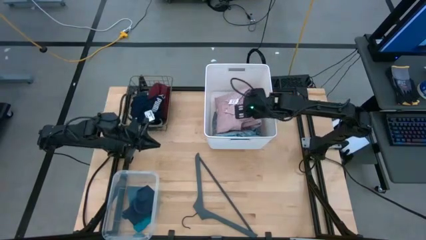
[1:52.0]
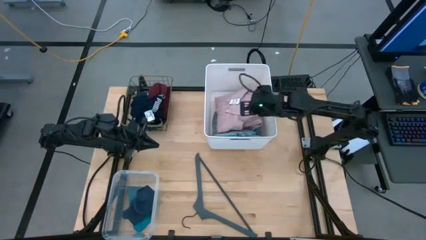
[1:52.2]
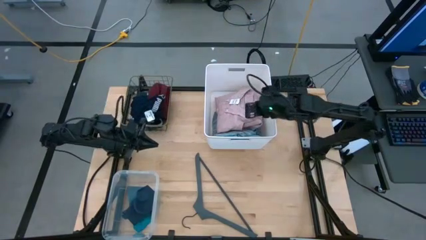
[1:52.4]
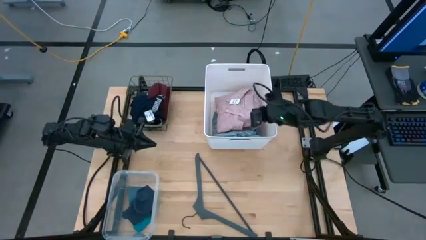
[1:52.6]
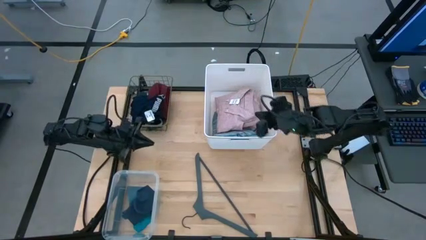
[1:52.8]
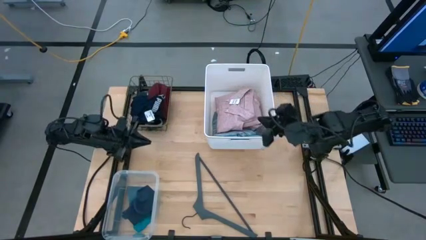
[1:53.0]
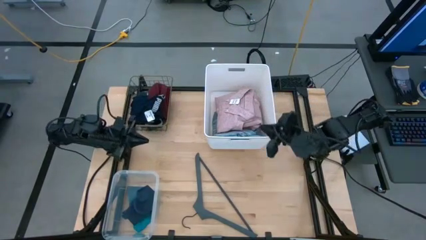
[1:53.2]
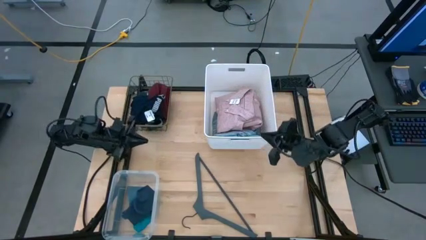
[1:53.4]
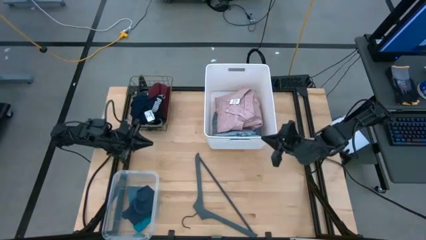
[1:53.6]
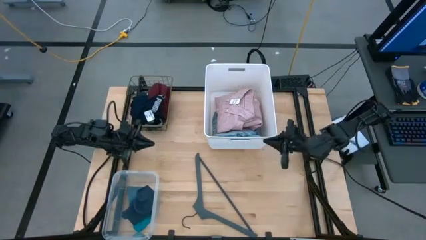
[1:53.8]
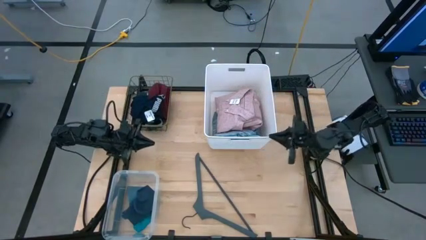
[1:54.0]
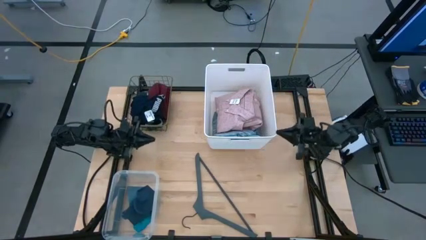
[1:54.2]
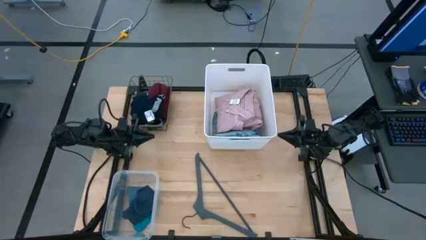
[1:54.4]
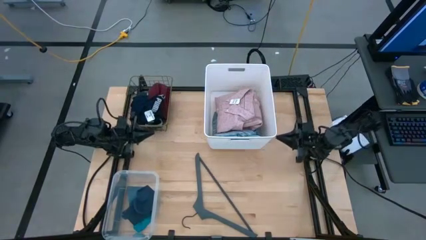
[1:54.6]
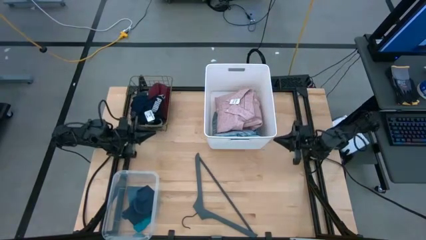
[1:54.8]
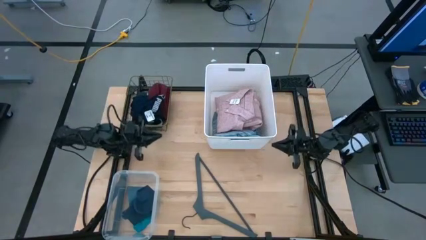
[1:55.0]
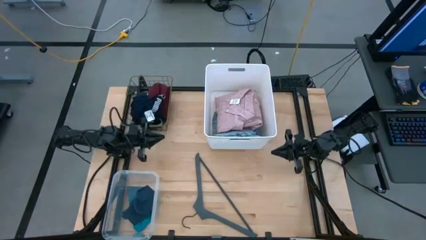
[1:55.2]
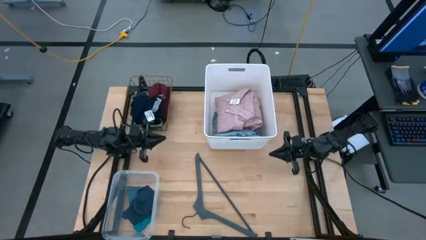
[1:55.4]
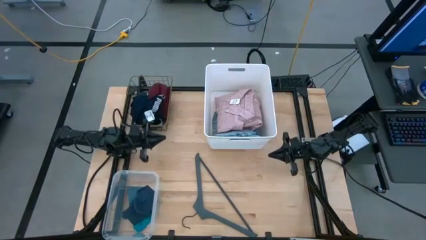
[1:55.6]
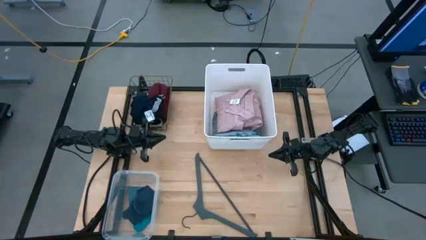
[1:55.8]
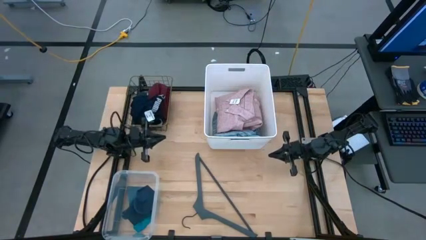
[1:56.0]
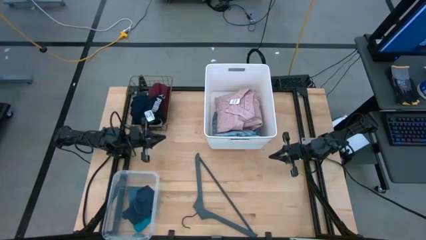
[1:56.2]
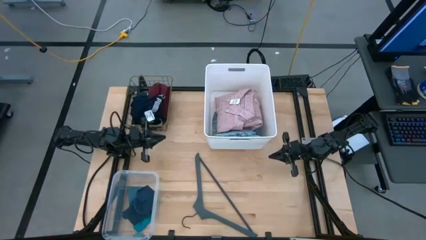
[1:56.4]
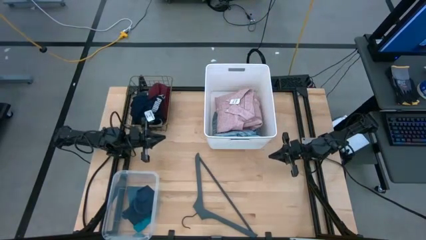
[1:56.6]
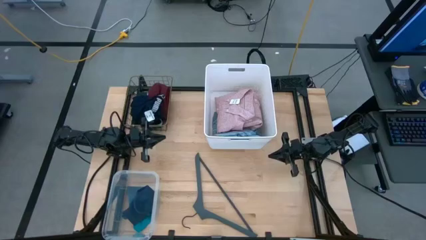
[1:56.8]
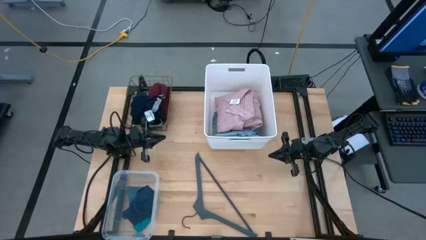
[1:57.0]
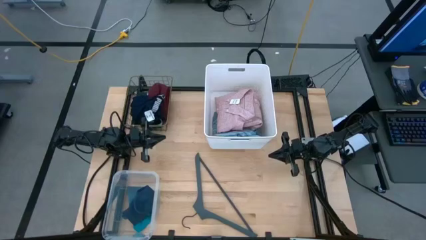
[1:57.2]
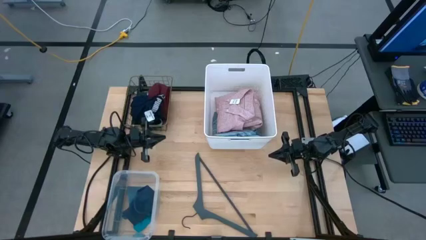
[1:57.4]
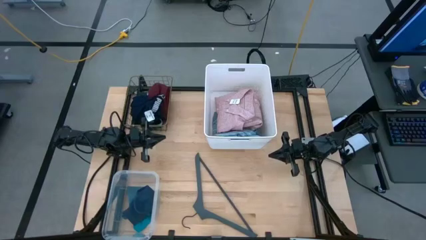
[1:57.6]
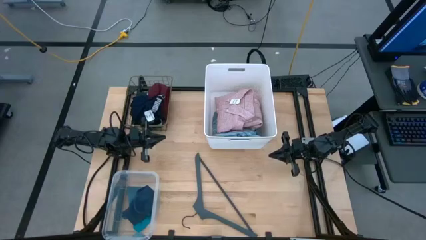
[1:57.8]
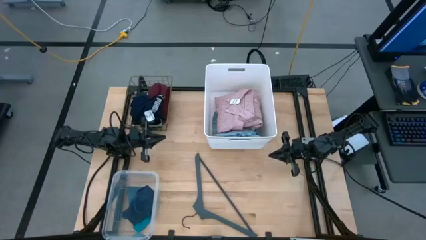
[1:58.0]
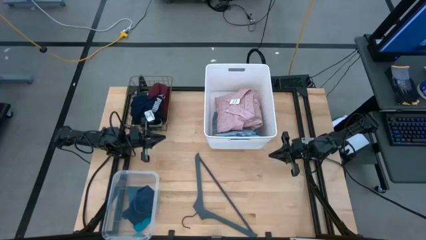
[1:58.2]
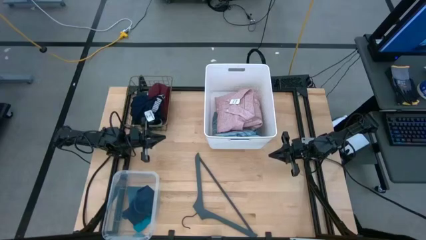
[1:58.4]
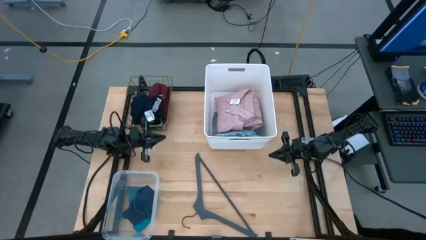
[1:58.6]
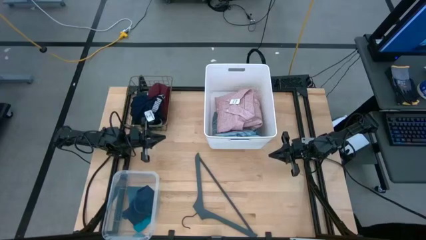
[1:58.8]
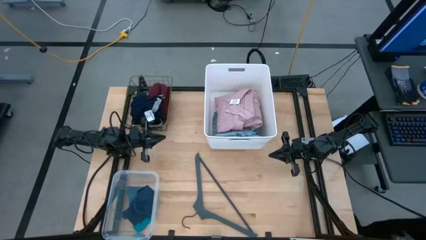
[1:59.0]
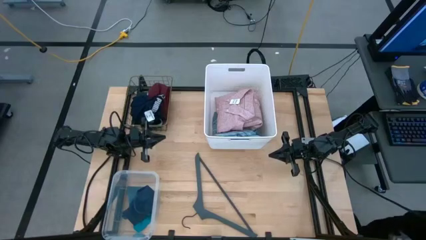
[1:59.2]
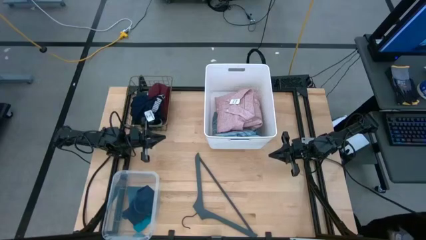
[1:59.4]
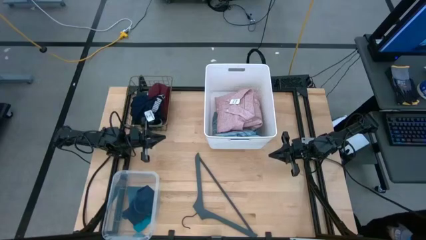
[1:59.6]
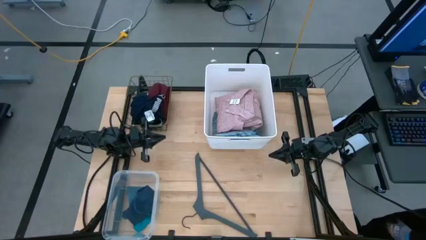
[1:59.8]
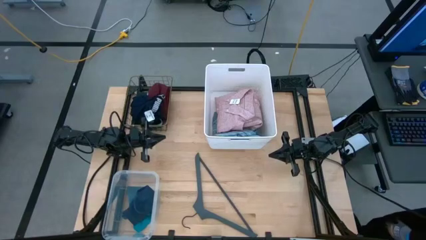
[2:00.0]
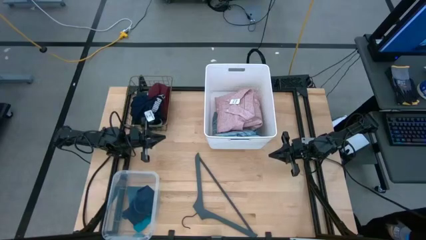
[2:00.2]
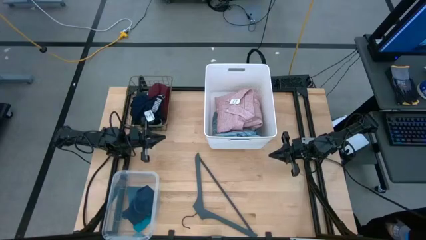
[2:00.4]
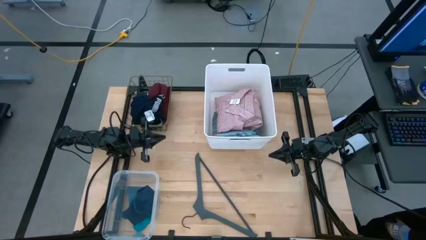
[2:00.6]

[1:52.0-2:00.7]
Task: Pick & Place Cloths
Return to Home Position

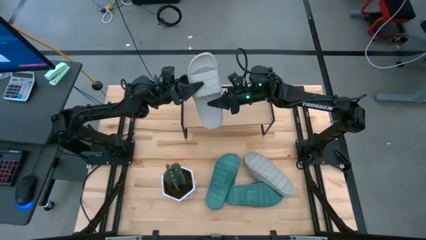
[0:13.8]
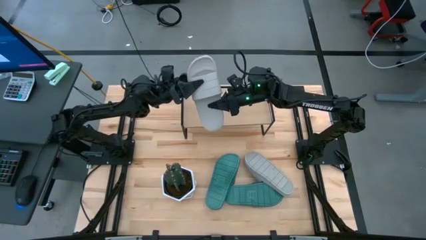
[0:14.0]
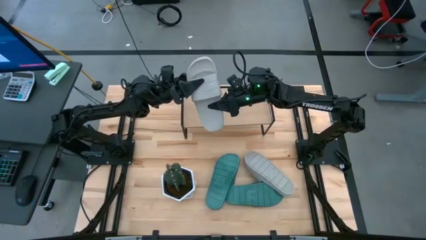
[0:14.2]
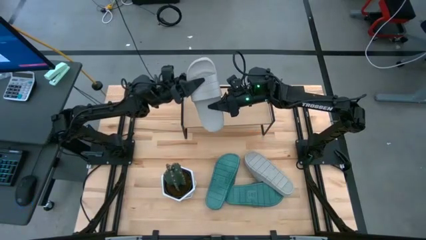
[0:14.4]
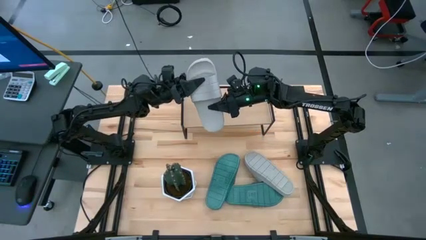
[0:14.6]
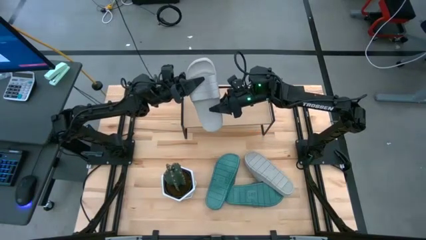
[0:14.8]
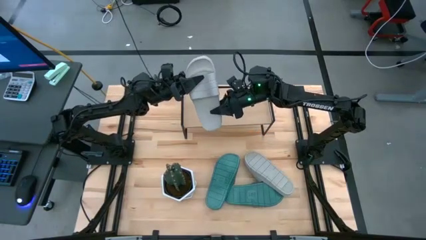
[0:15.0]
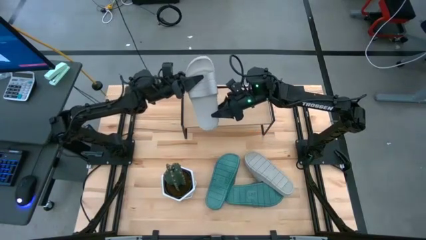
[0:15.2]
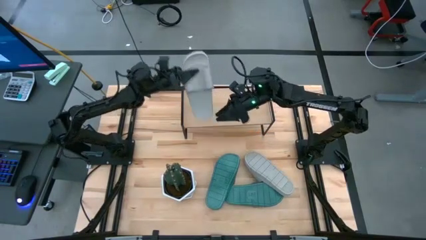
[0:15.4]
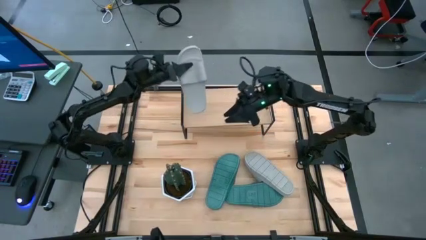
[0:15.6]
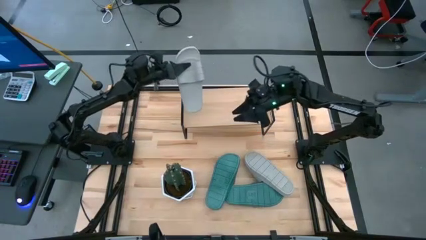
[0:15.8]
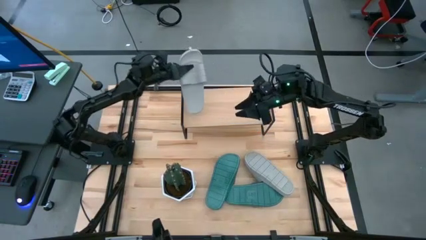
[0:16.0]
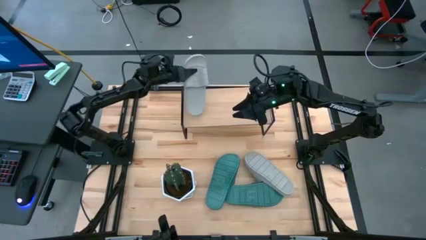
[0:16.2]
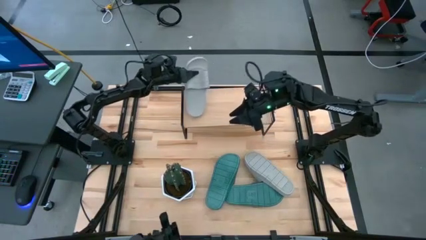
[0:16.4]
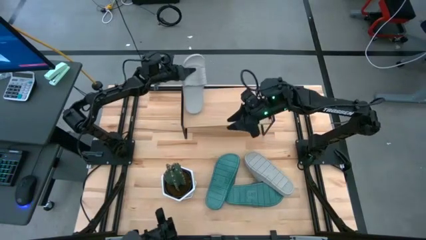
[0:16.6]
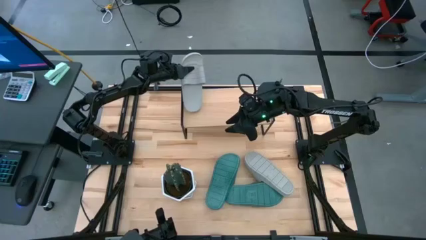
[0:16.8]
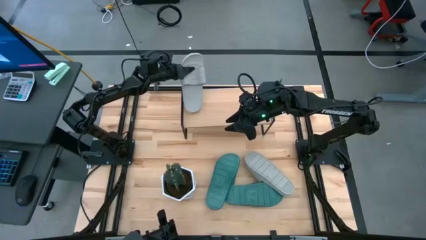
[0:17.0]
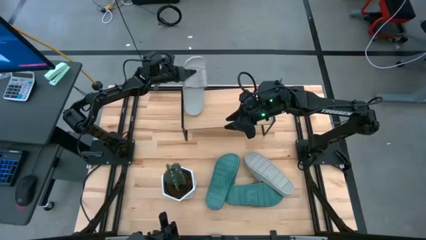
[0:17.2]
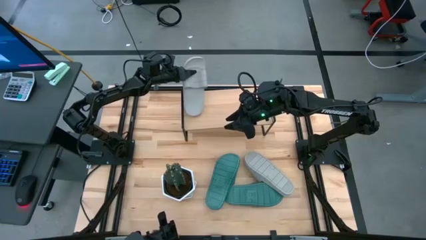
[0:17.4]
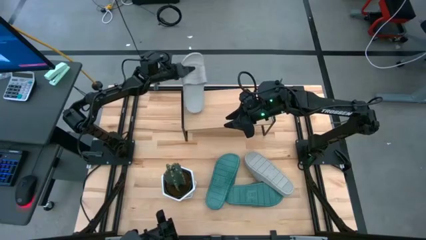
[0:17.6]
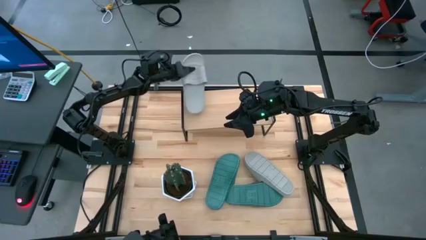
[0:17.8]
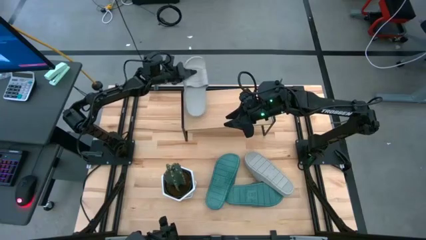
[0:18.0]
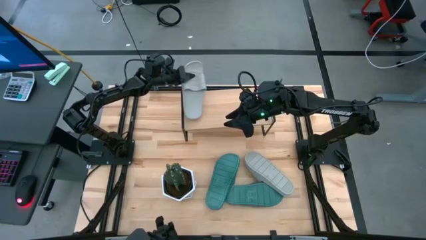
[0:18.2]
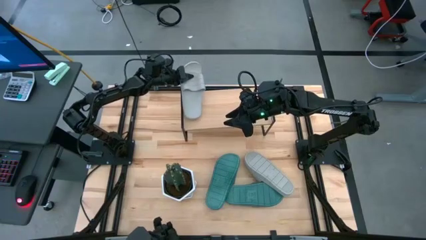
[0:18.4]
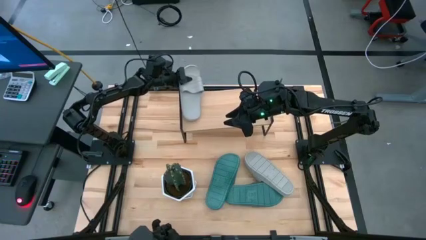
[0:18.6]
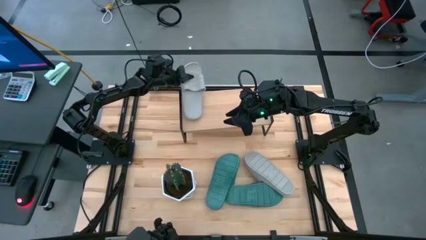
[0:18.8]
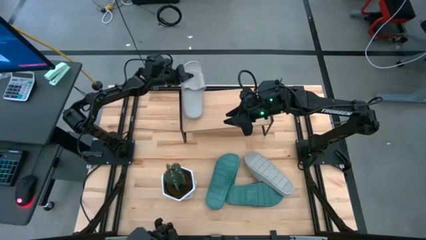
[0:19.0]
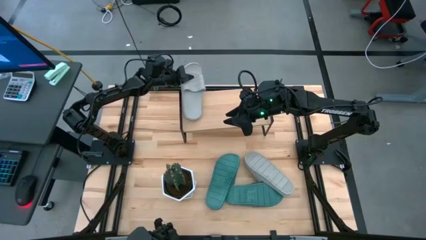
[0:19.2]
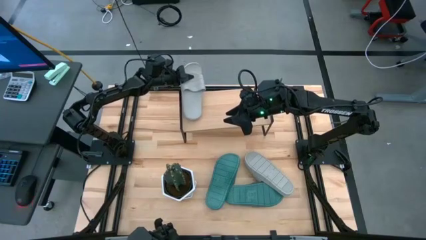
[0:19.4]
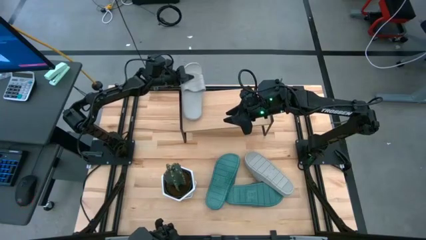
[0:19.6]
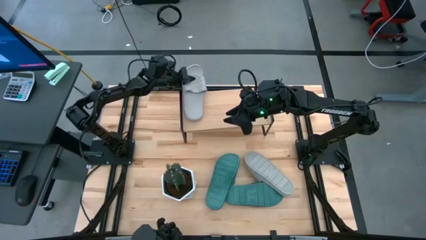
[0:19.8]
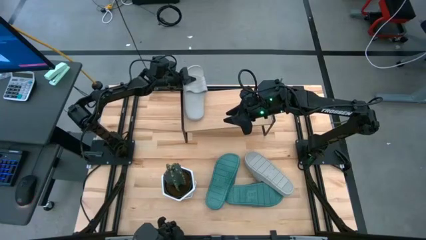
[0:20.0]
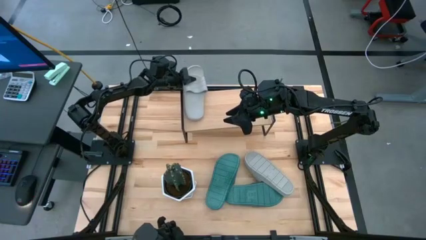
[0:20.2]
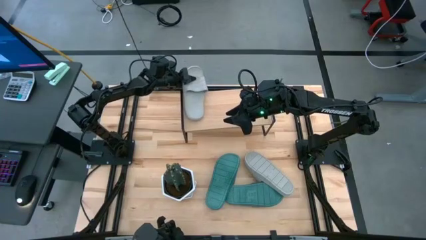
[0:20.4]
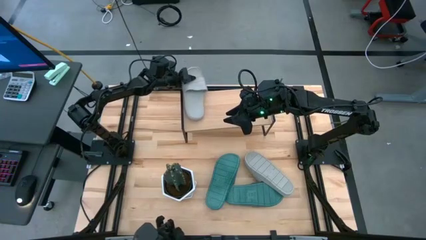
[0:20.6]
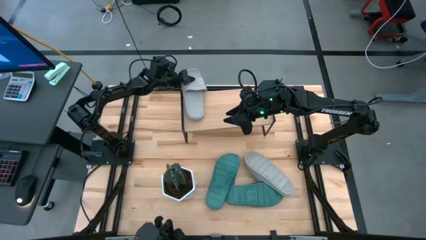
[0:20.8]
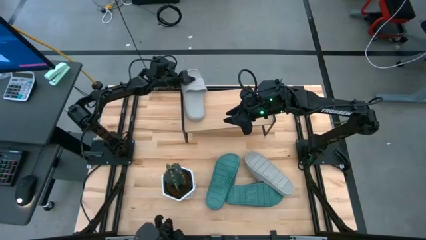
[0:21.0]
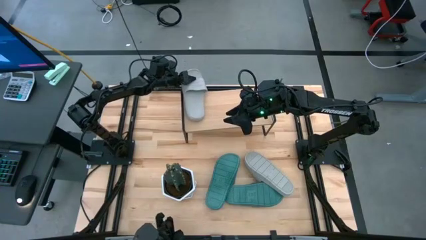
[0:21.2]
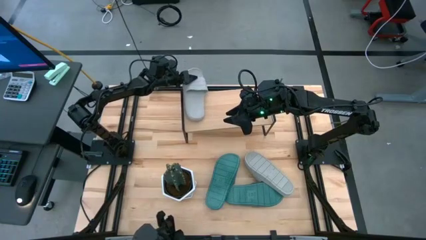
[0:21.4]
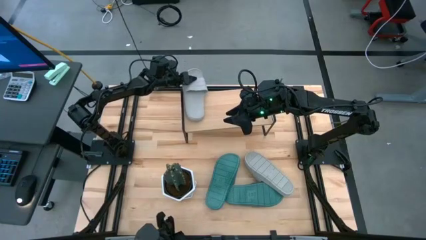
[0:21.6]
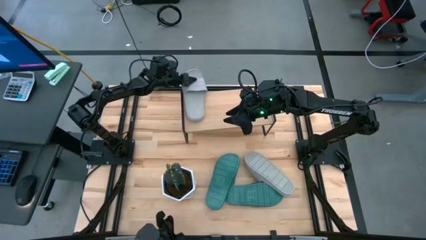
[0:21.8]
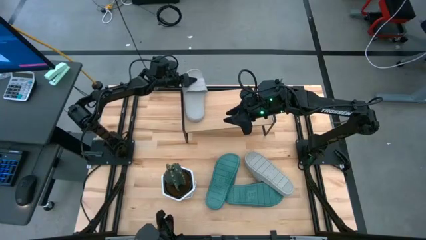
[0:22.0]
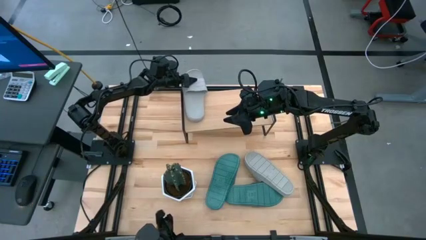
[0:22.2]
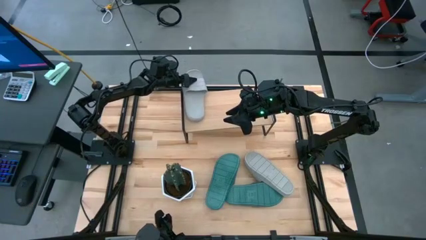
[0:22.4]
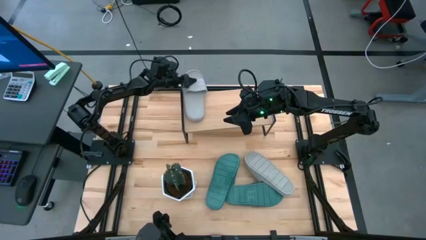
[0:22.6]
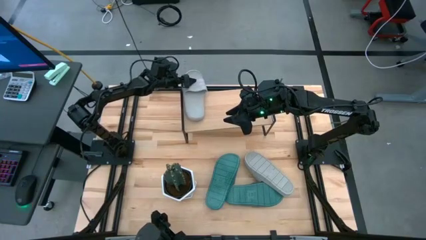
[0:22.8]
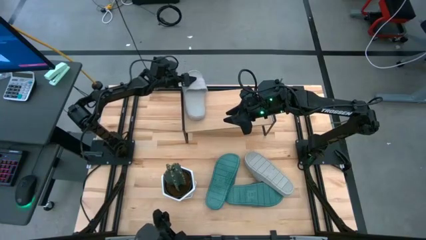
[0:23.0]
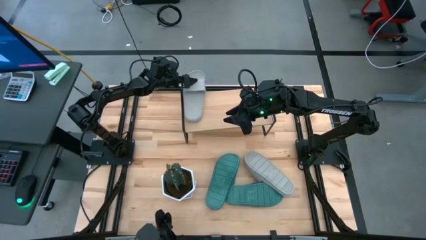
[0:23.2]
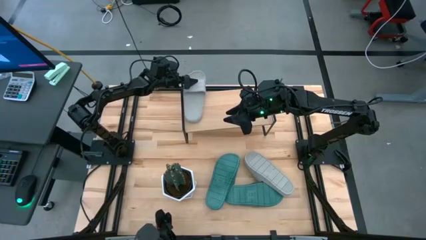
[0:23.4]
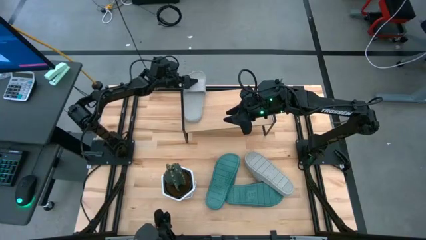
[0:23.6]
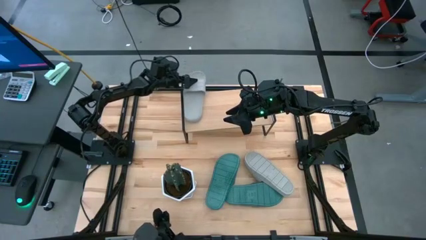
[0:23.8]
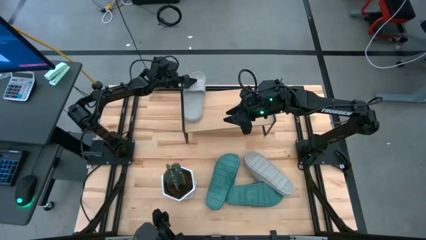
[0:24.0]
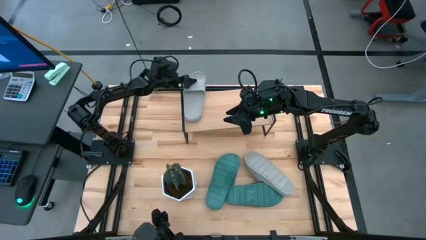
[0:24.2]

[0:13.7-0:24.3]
Task: Pick and place slides into the shelf
Put the right gray slides on the shelf
